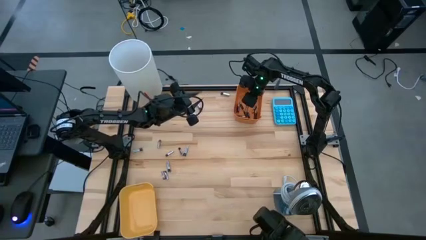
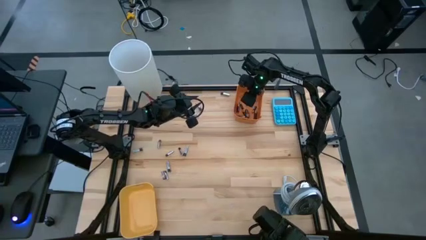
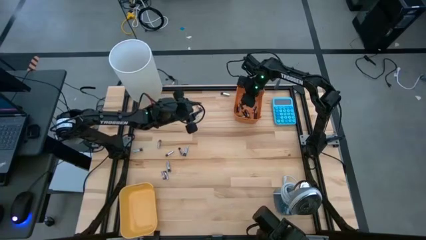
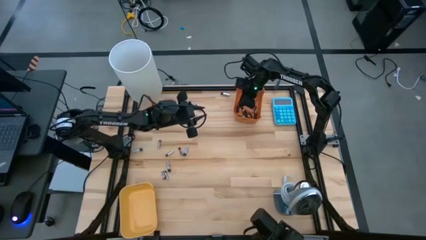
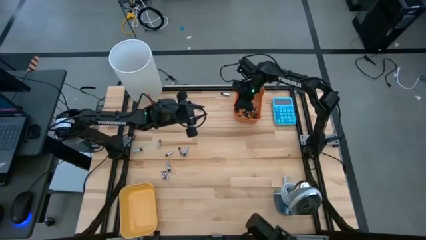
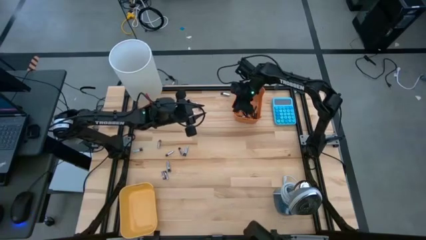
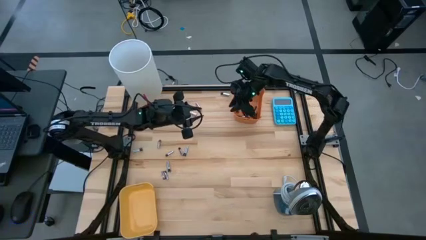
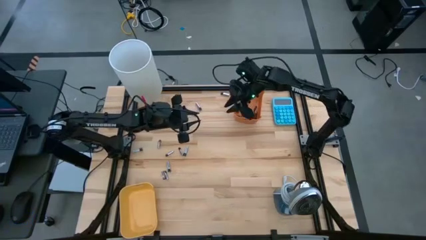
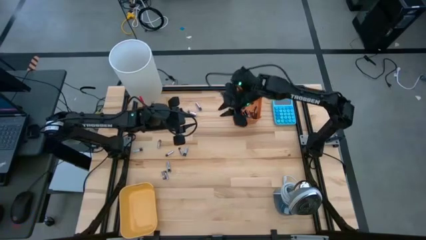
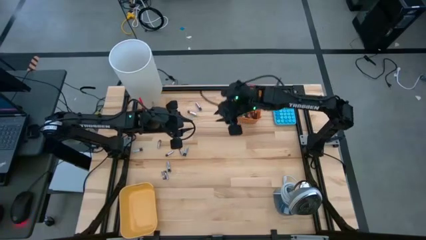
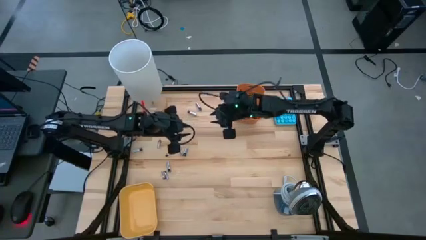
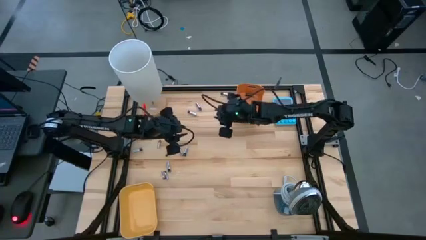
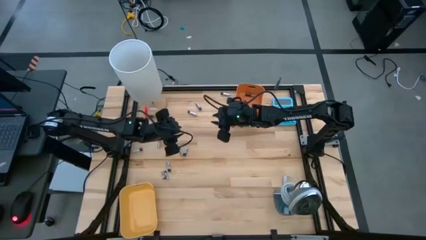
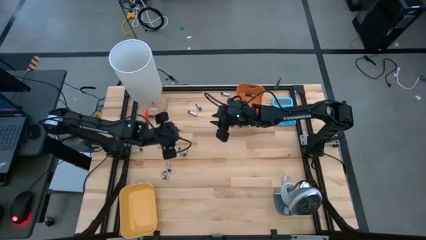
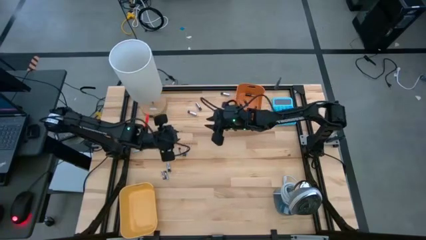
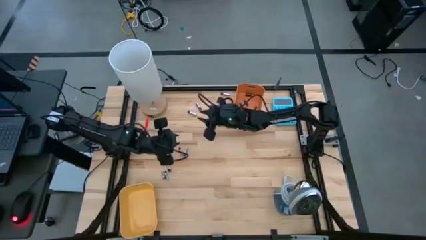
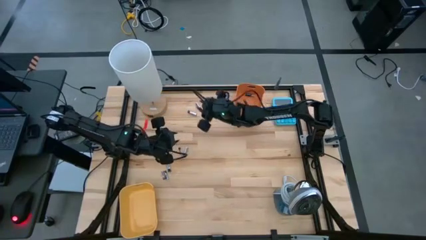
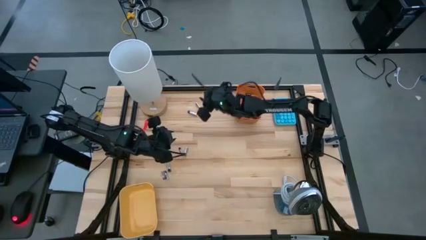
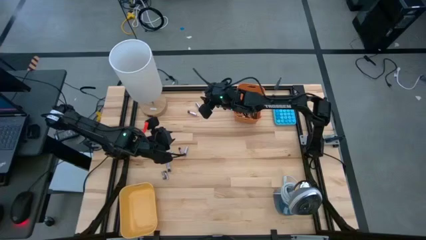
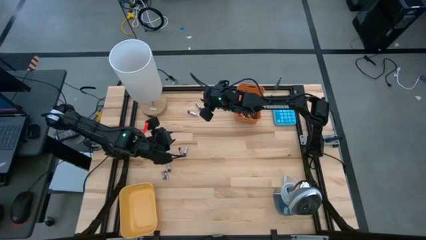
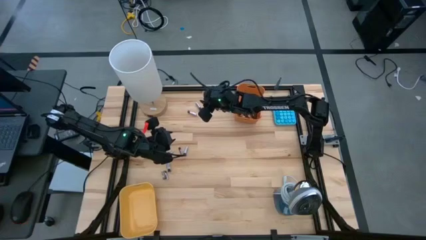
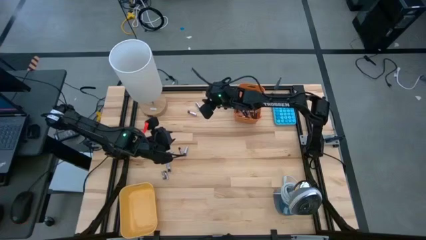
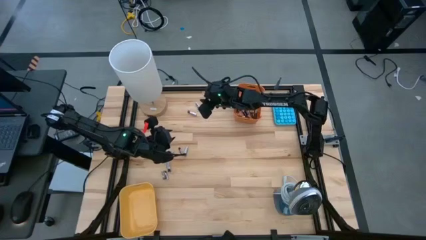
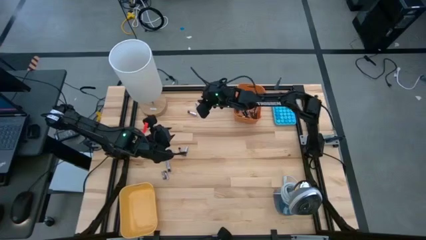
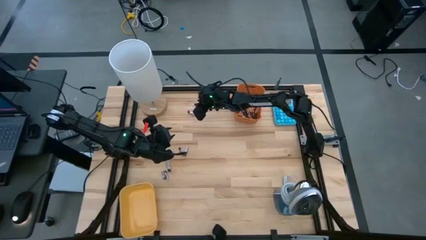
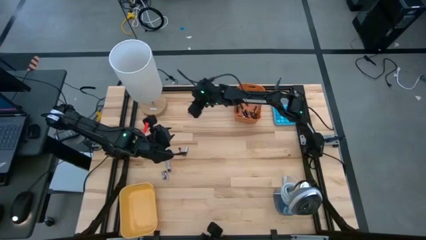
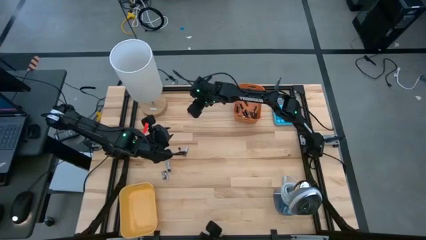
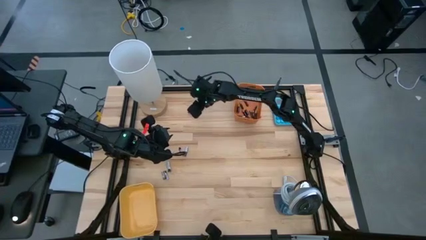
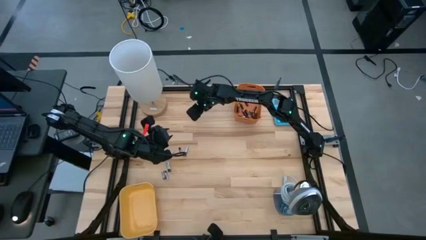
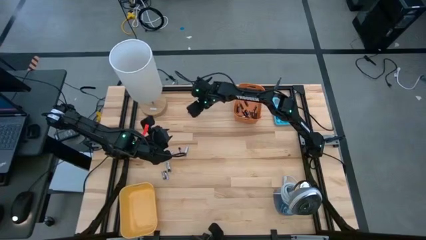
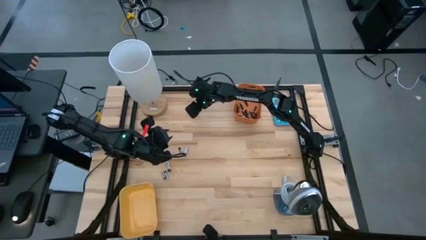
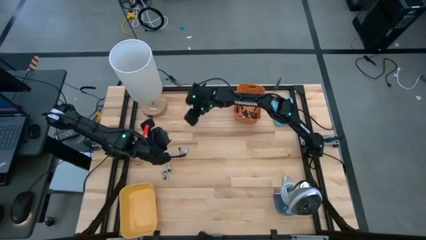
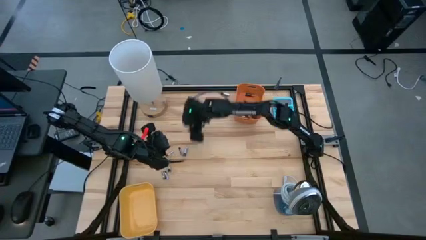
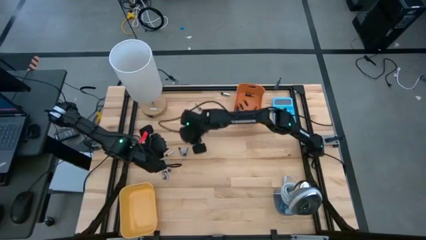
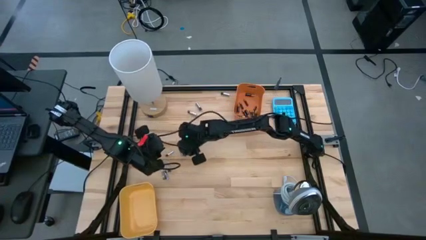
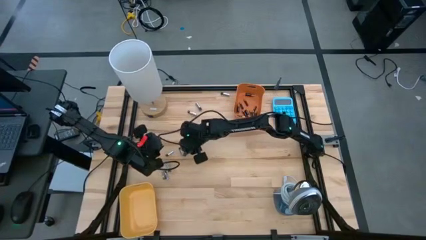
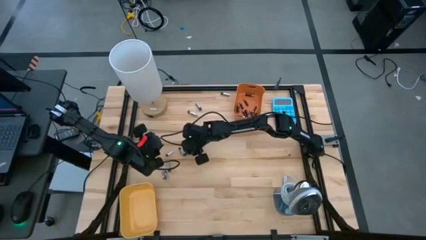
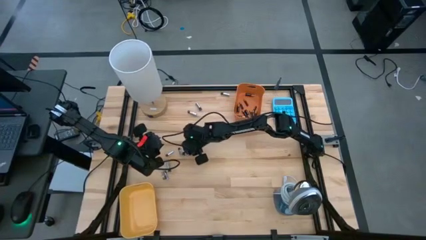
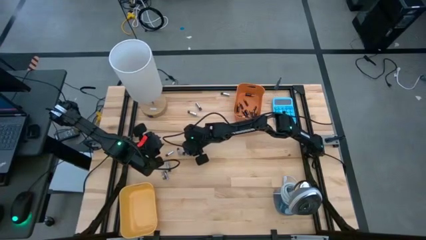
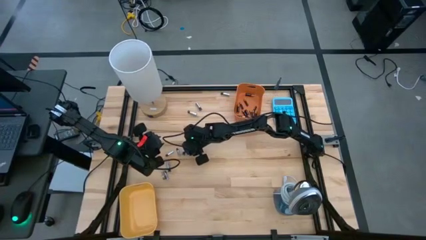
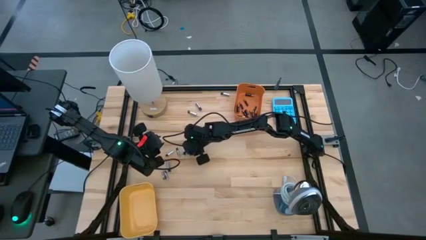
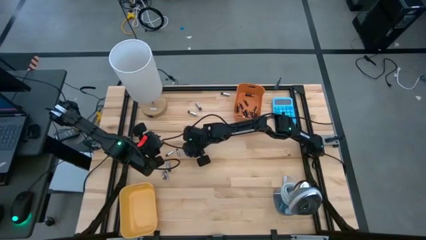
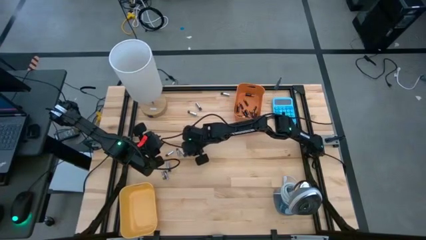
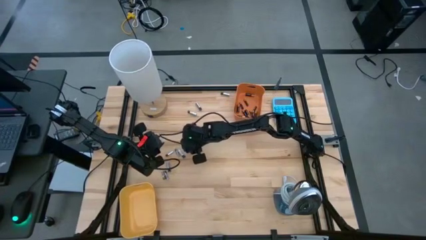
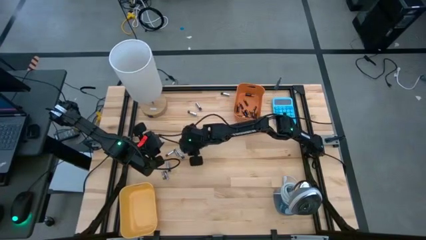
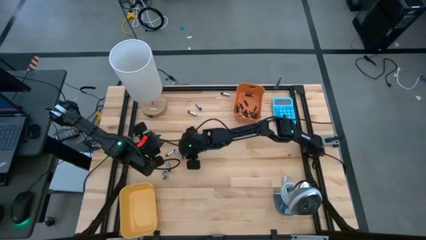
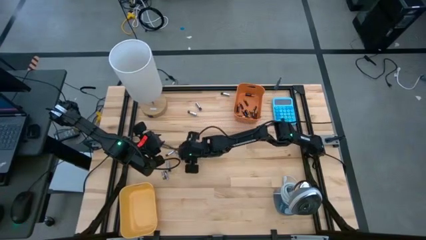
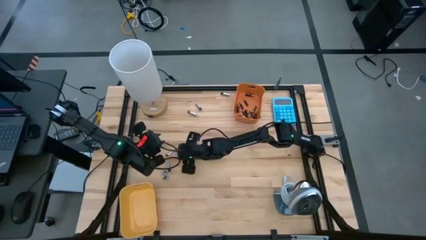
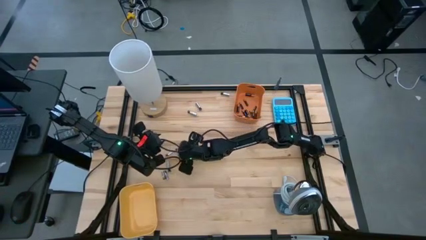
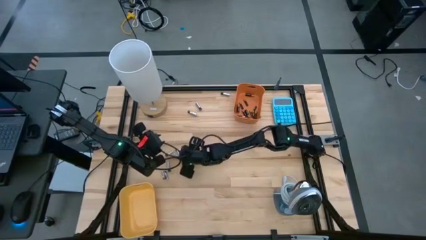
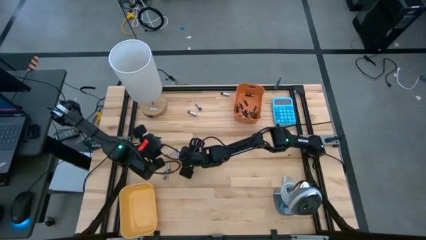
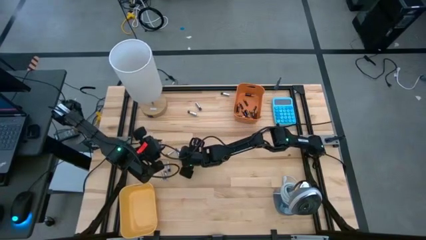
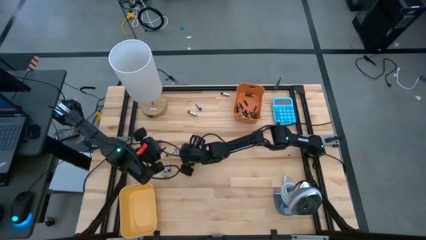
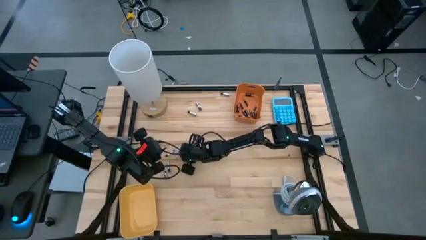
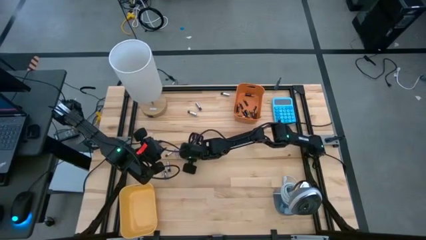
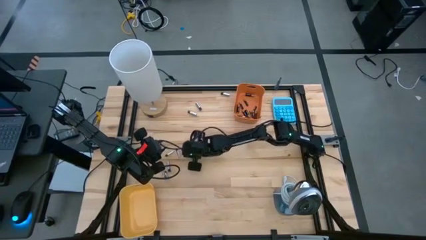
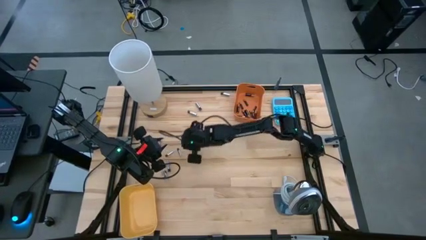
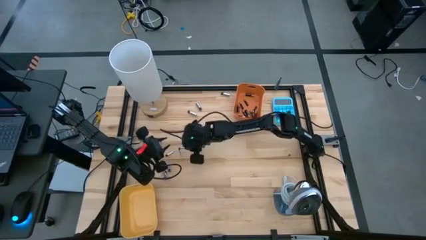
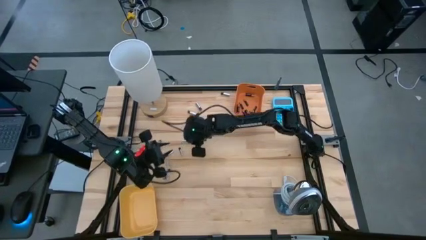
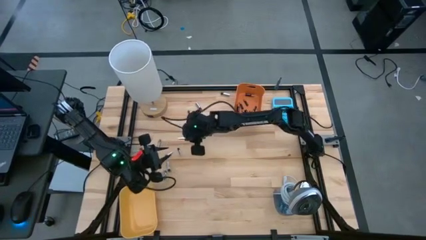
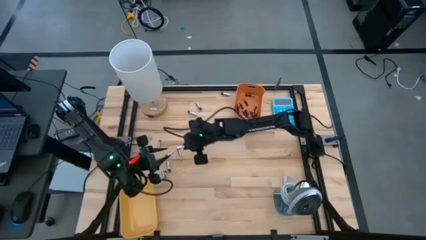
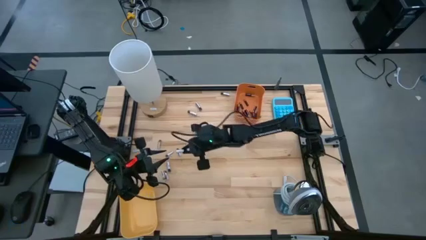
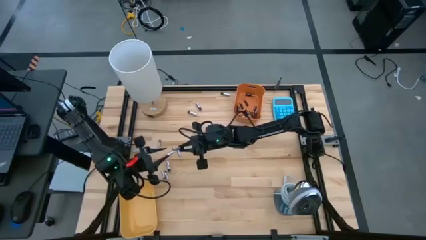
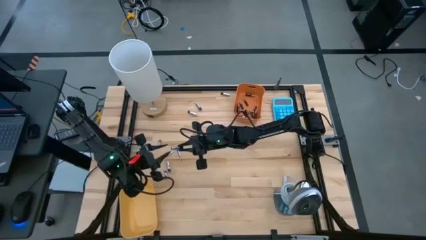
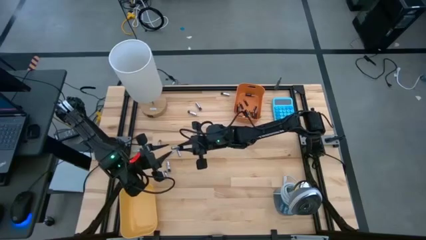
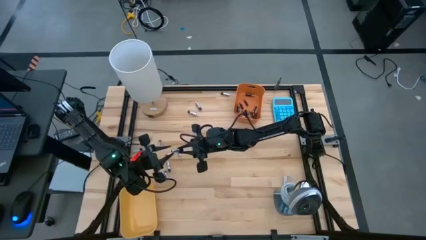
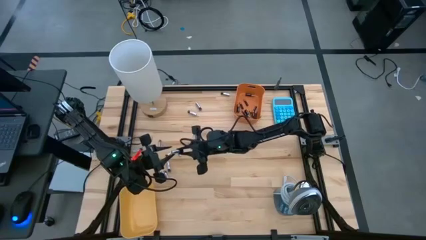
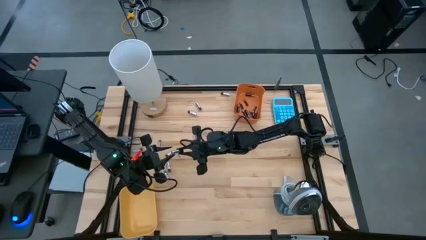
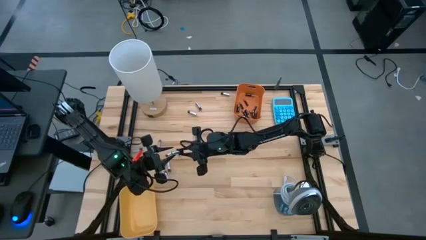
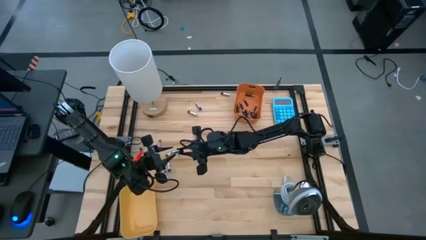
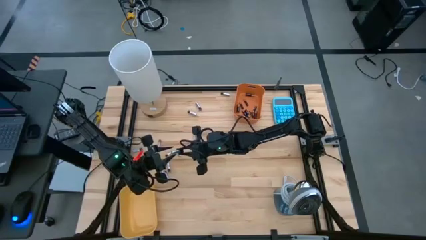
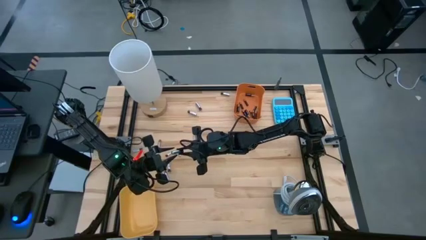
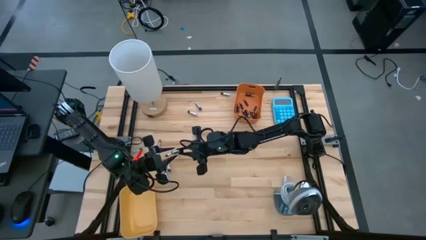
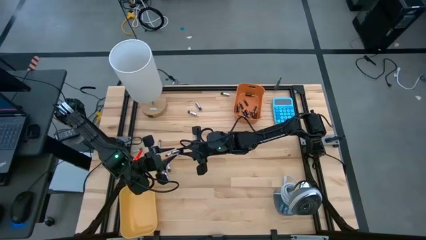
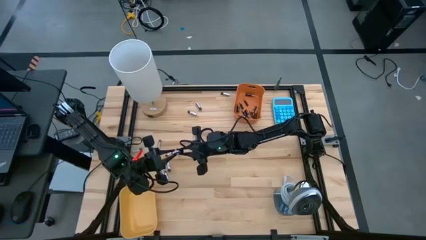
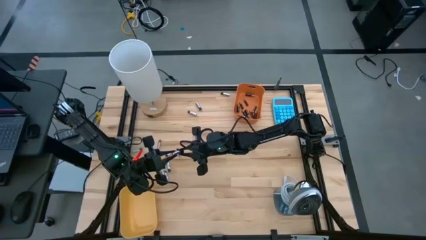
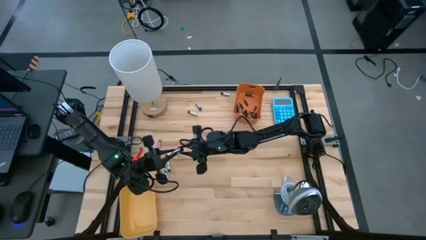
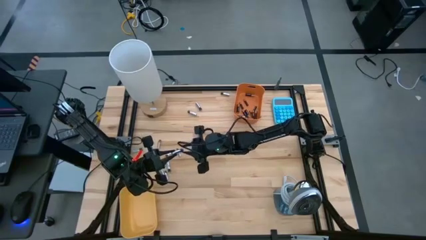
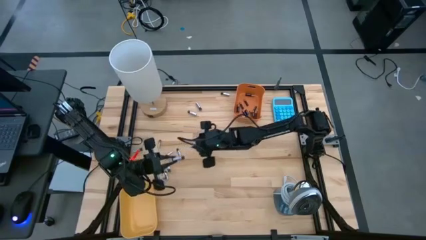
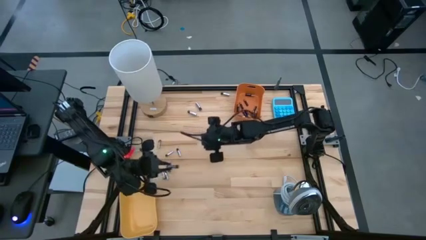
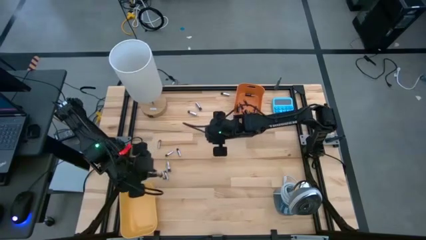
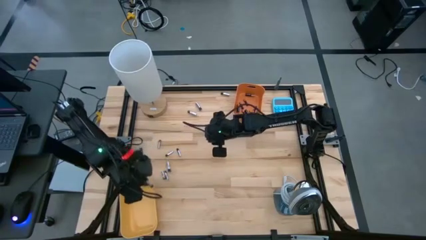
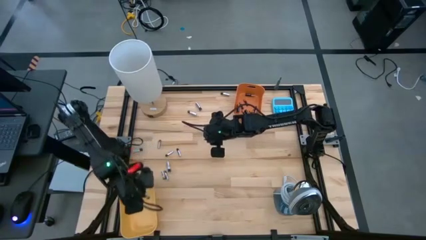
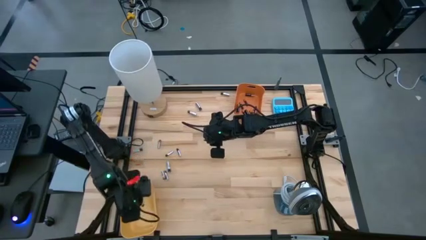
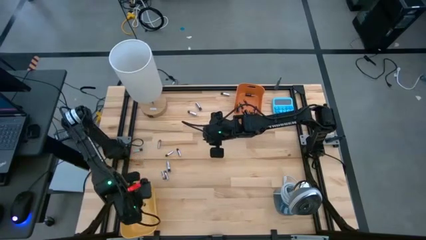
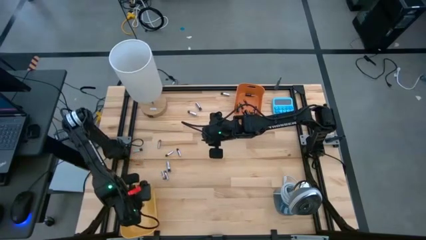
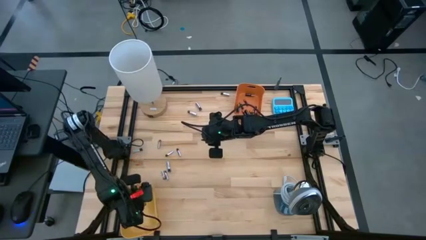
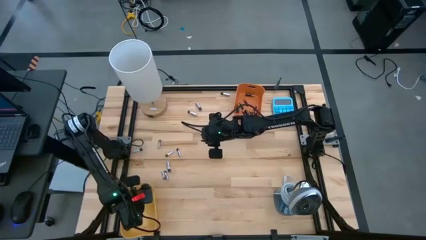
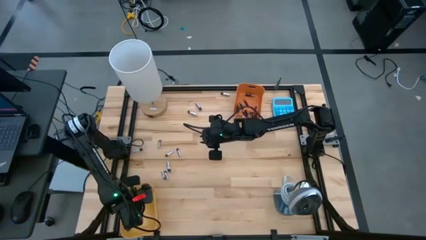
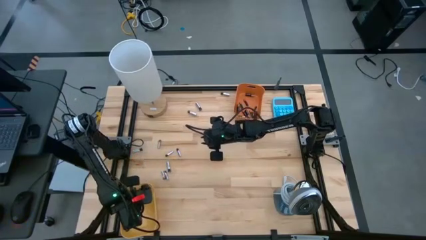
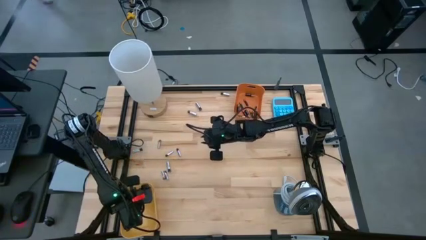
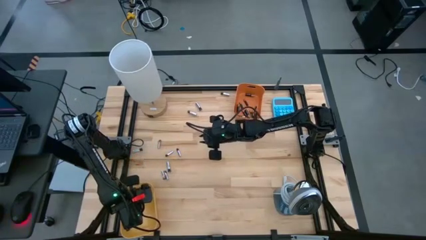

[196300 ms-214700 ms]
Task: Sort batteries
Put the silver battery into the yellow bin
